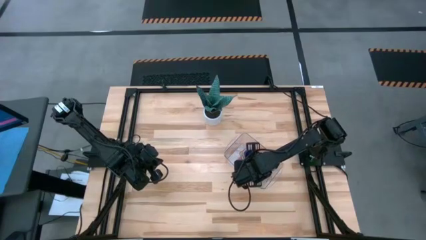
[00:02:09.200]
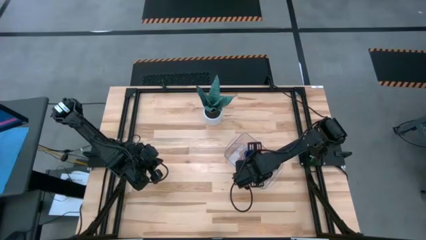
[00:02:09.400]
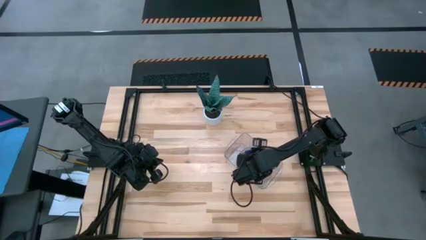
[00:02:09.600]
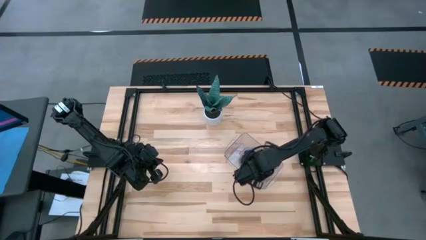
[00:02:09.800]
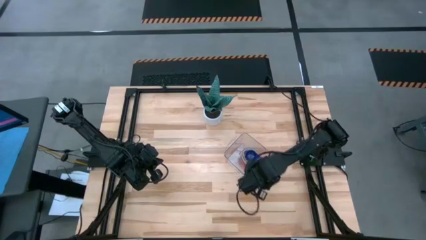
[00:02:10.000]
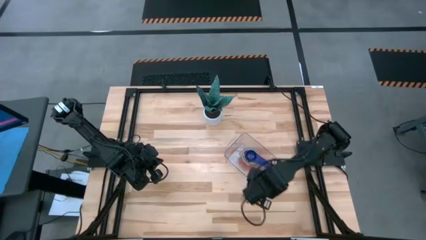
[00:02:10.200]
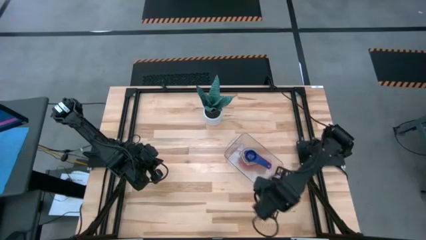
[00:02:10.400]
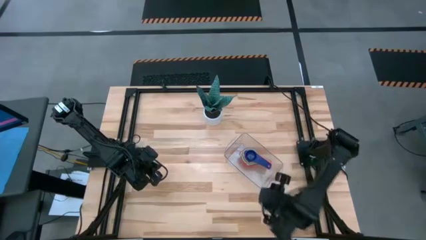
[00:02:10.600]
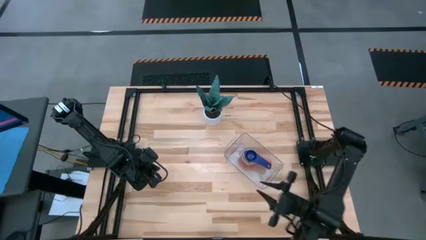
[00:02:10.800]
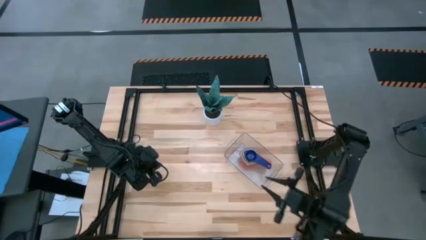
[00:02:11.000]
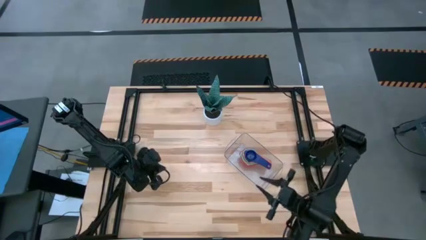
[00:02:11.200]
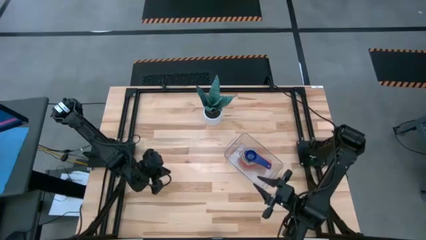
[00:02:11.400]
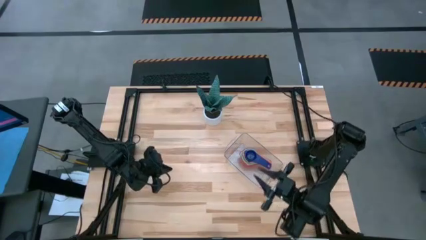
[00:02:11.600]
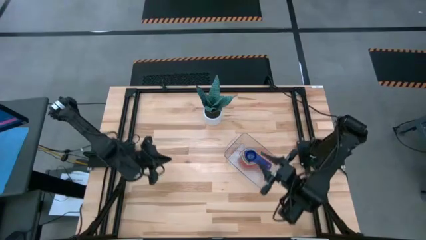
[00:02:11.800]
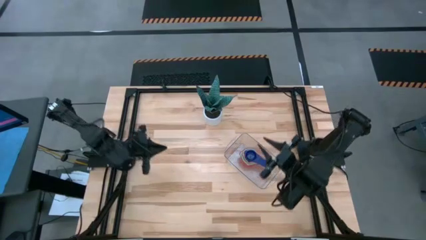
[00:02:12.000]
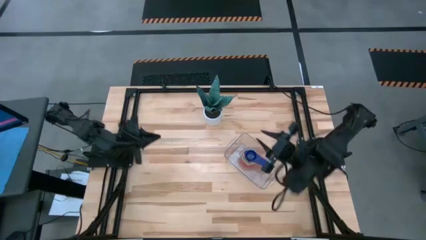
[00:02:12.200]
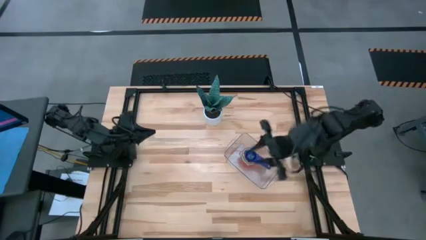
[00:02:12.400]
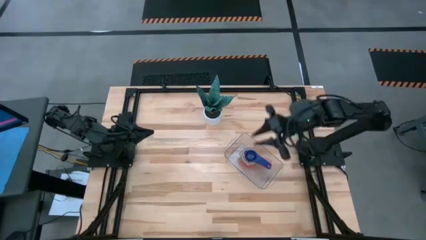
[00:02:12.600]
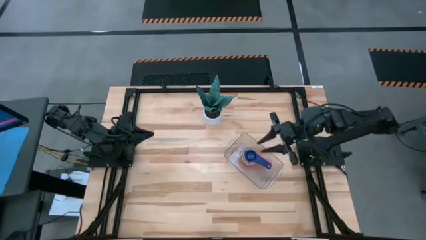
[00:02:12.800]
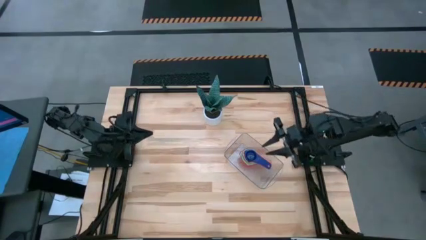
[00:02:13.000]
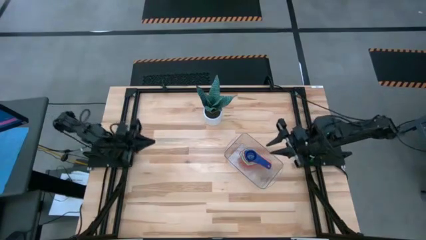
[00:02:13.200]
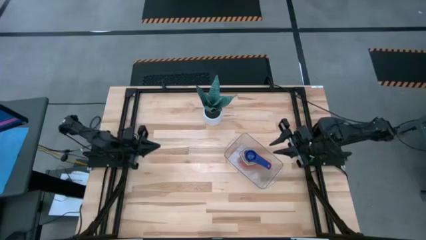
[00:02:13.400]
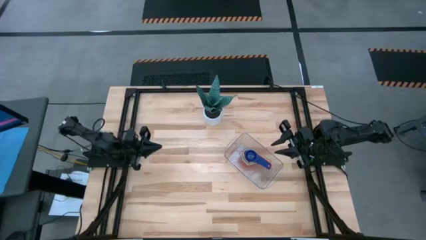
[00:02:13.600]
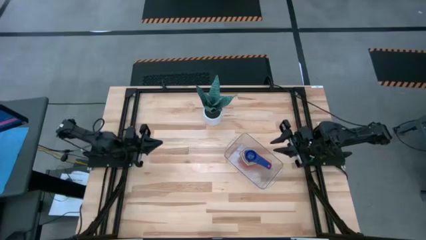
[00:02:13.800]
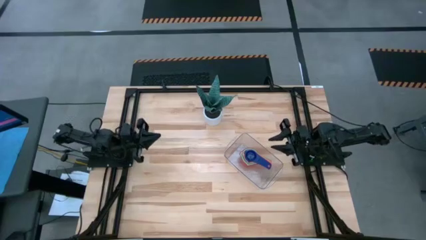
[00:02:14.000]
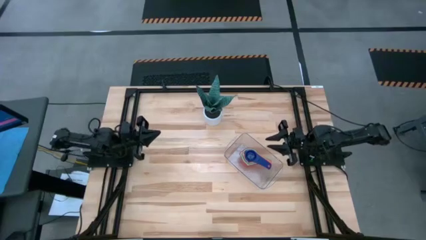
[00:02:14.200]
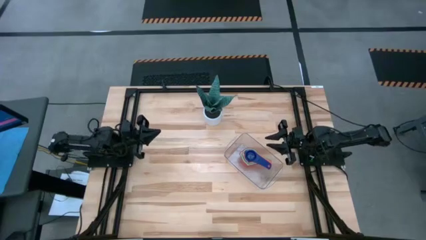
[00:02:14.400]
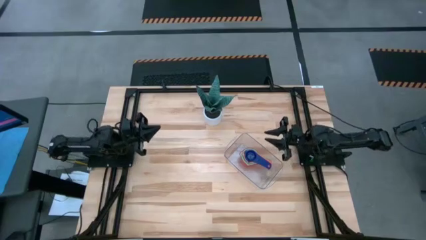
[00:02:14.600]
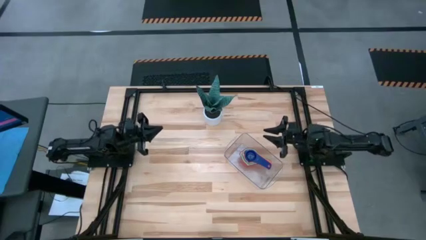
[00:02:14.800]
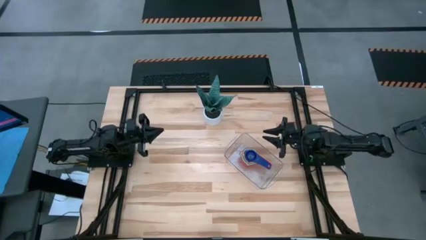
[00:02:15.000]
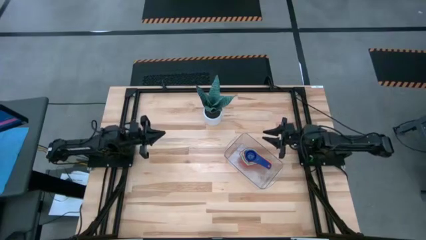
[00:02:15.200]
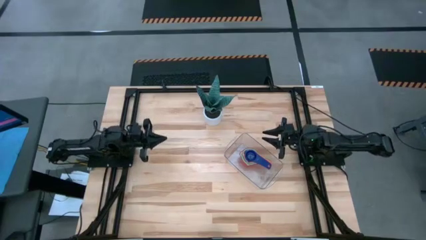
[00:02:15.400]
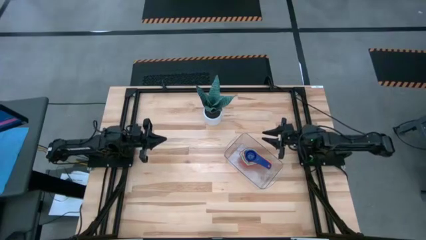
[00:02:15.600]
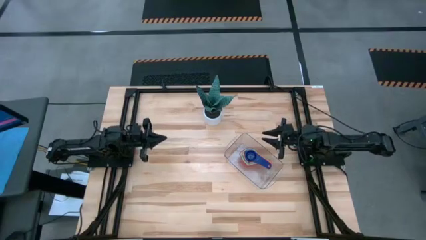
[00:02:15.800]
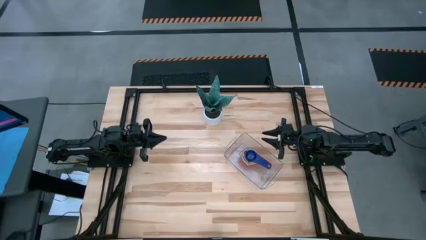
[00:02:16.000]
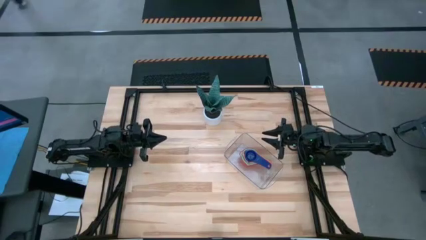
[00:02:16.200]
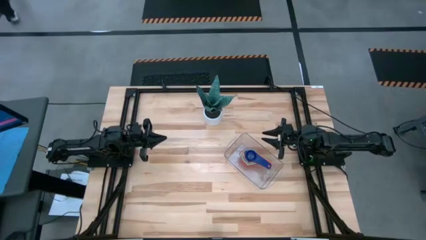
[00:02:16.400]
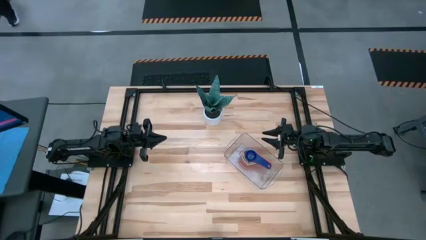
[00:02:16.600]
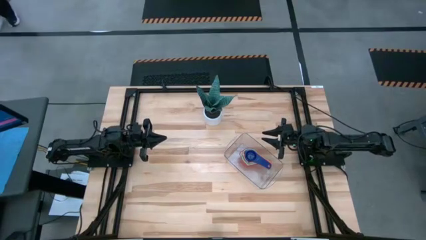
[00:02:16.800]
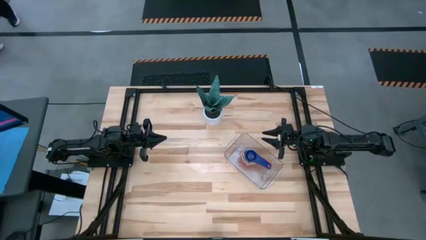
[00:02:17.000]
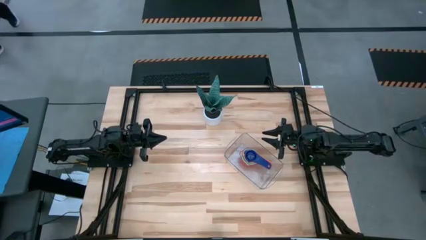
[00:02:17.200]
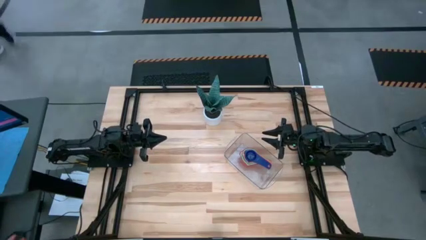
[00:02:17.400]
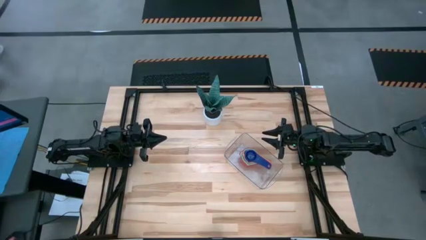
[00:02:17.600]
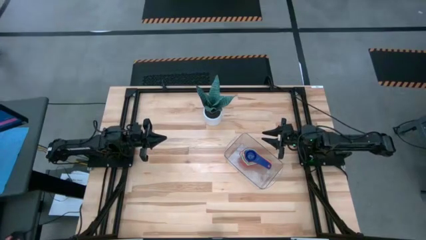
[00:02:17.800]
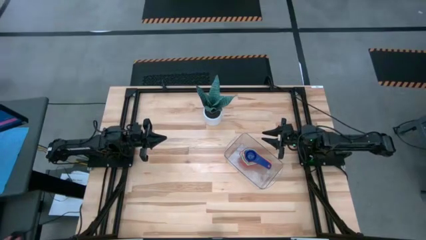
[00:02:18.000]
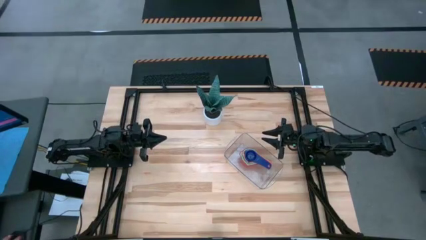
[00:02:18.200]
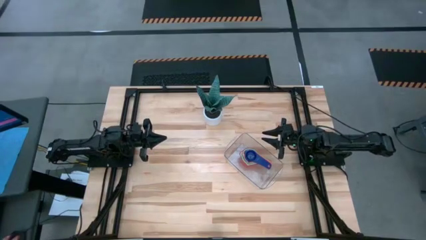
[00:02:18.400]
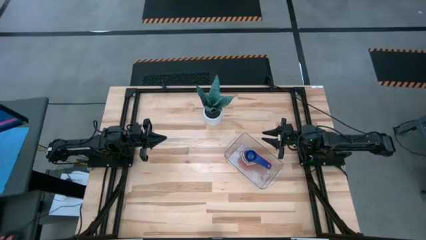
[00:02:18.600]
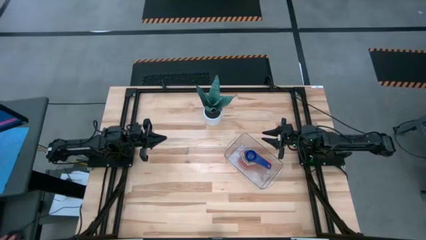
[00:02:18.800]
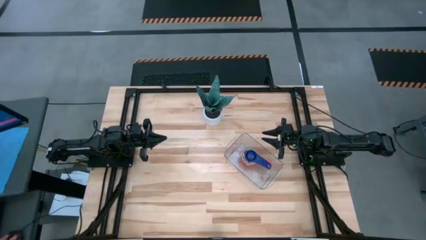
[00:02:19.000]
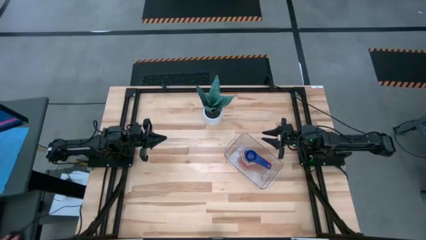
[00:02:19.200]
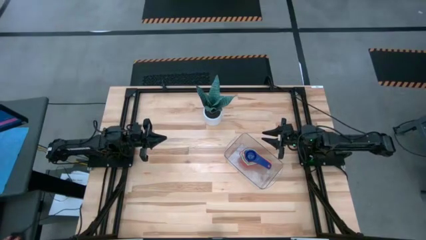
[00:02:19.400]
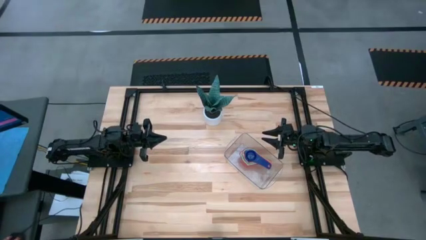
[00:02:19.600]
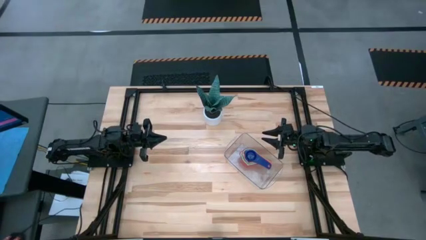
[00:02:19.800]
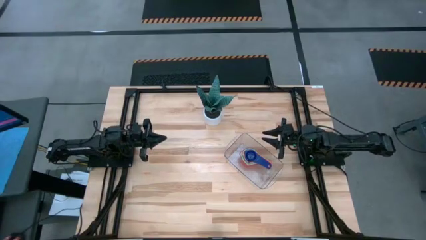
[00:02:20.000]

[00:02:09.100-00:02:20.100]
Task: Nest measuring cups in basket
Return to Home Position
